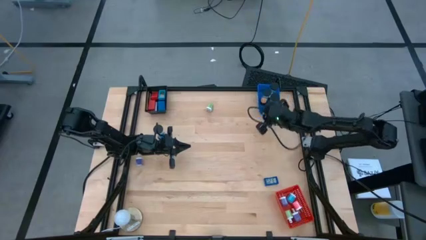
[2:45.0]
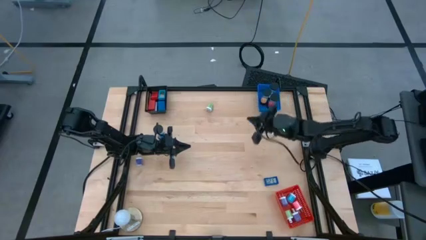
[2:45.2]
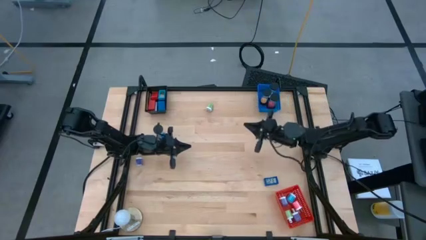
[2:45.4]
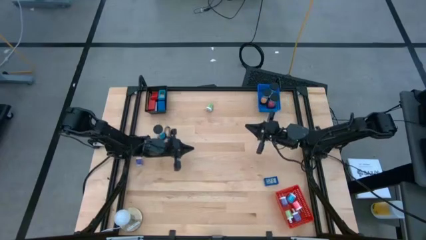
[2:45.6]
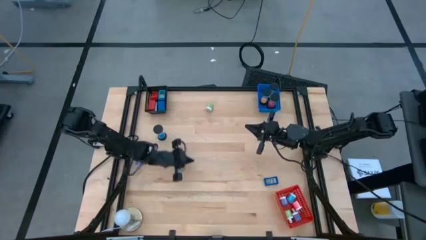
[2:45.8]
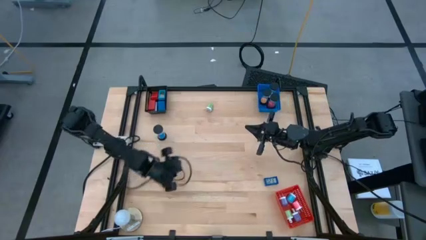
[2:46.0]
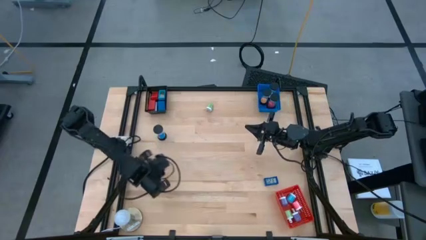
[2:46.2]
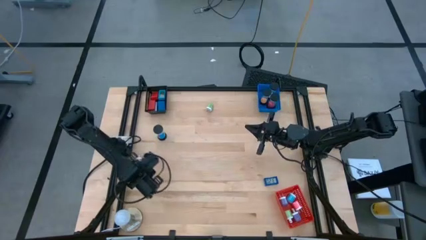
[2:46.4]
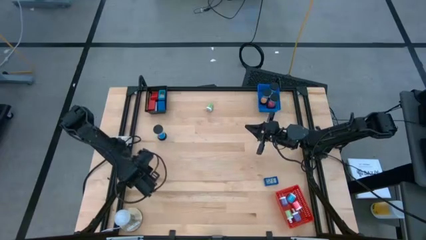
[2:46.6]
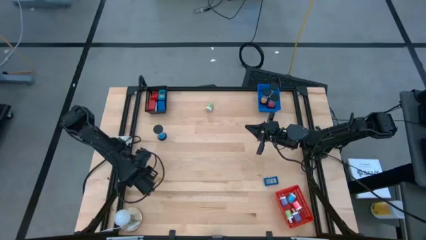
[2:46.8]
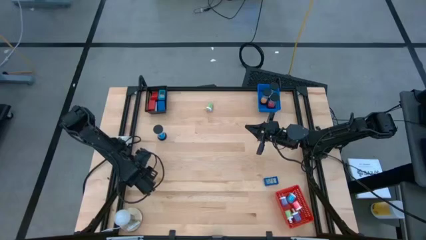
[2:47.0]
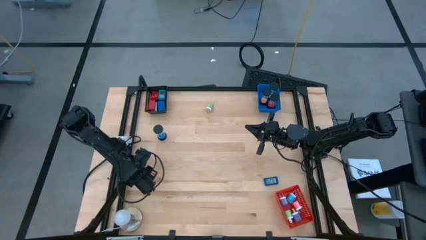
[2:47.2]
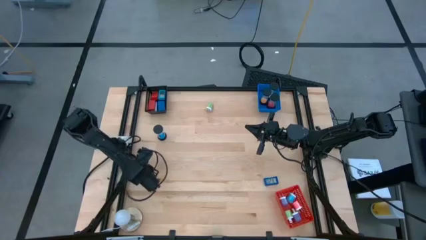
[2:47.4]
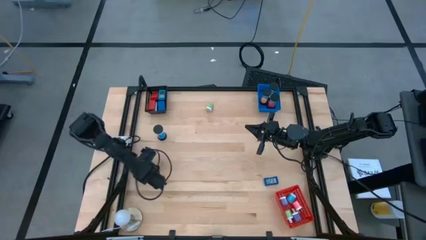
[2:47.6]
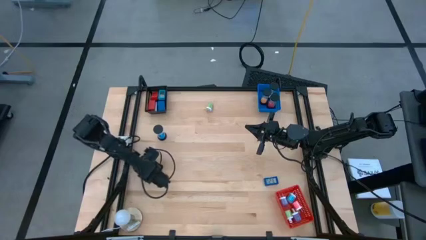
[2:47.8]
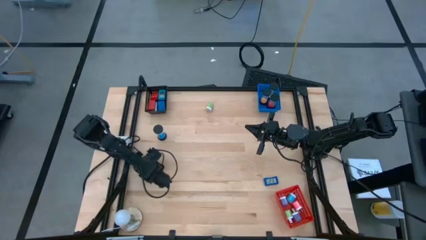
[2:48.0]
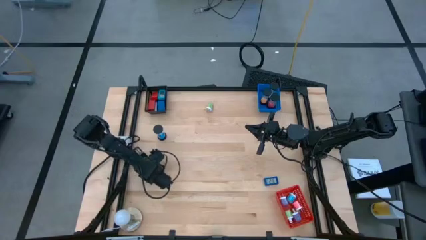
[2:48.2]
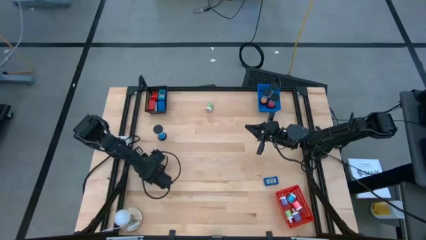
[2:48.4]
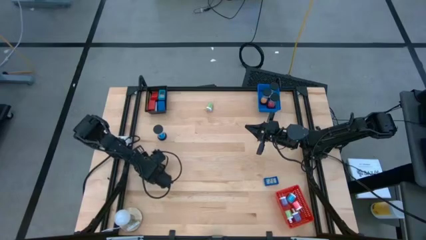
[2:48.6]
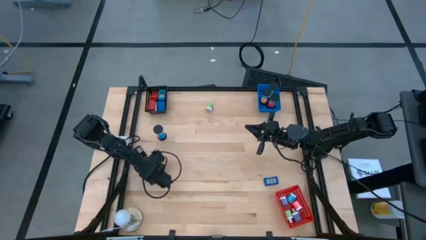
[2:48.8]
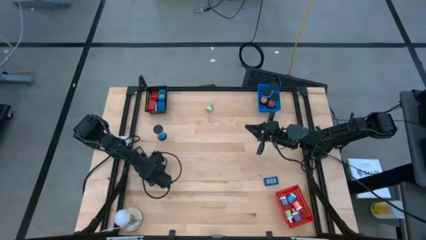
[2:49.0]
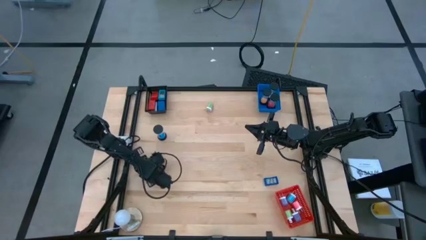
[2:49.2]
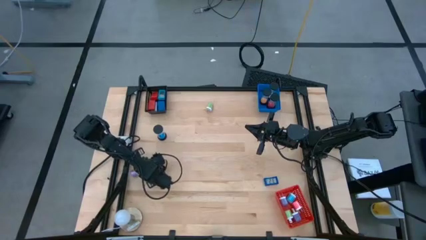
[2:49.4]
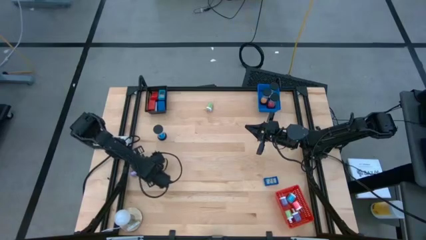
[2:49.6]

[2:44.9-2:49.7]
Task: Pick & Place Office items
Put the blue charger adapter into the red basket

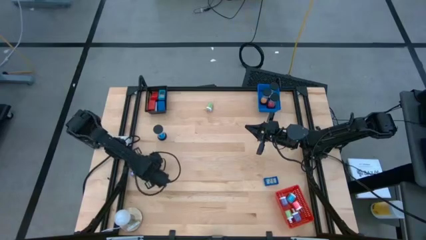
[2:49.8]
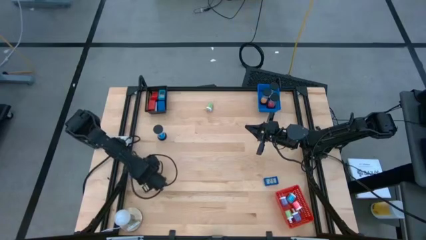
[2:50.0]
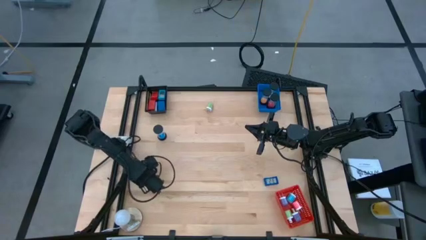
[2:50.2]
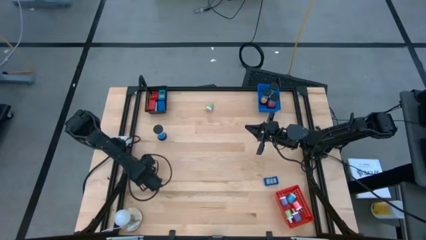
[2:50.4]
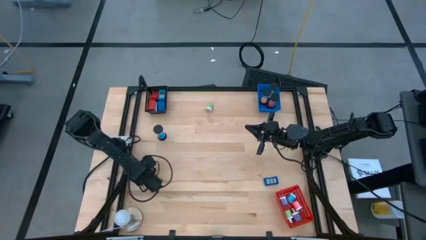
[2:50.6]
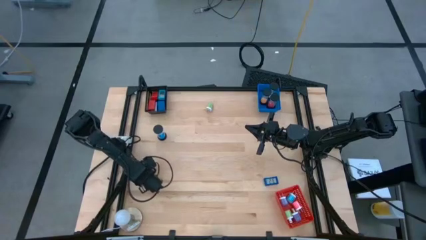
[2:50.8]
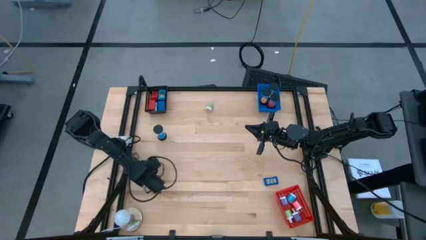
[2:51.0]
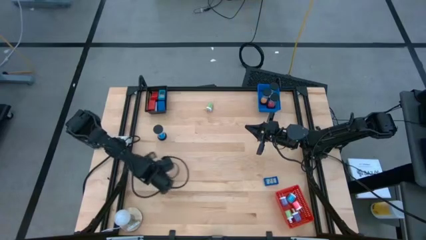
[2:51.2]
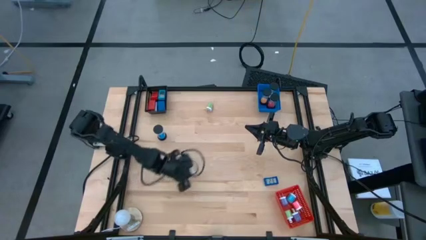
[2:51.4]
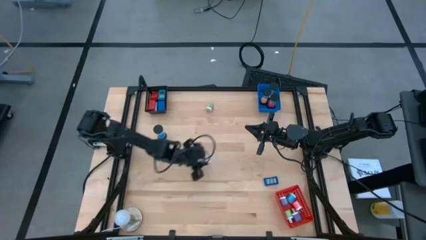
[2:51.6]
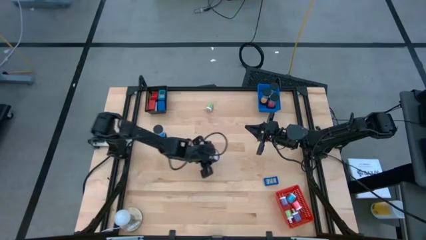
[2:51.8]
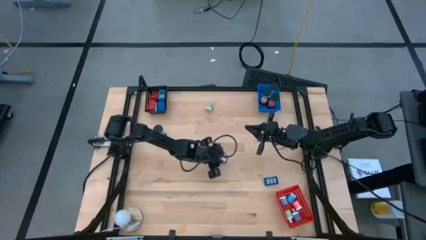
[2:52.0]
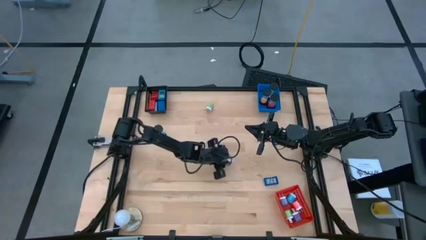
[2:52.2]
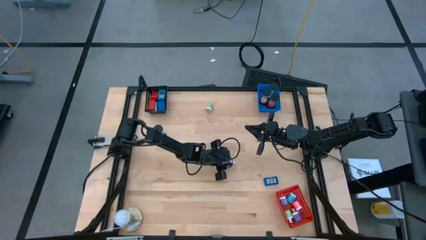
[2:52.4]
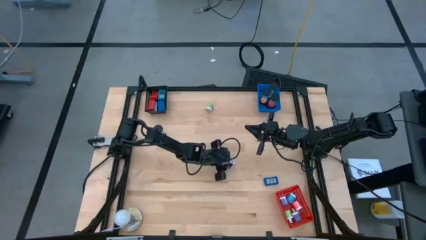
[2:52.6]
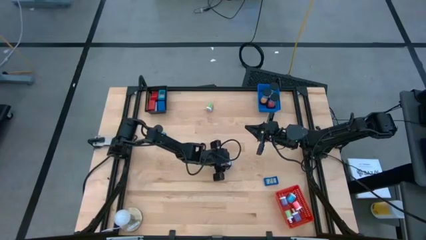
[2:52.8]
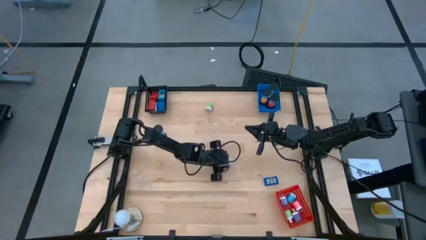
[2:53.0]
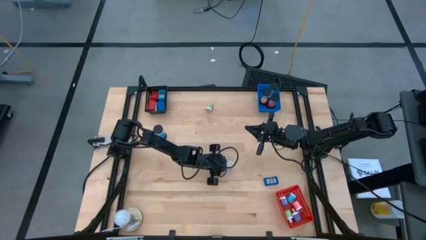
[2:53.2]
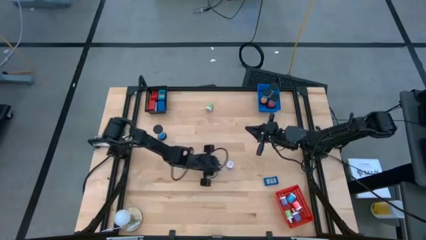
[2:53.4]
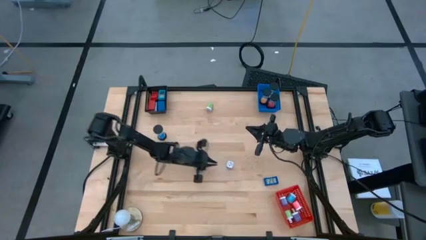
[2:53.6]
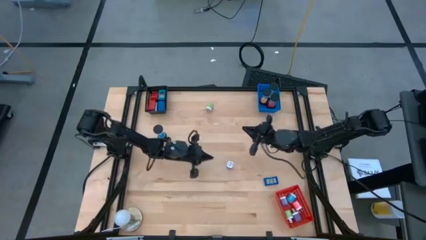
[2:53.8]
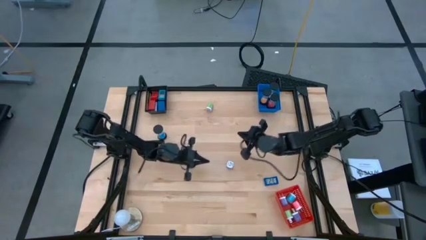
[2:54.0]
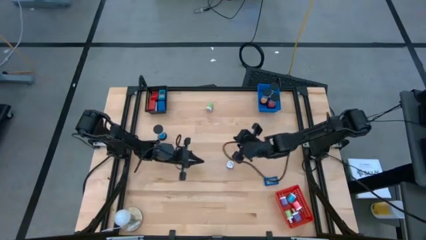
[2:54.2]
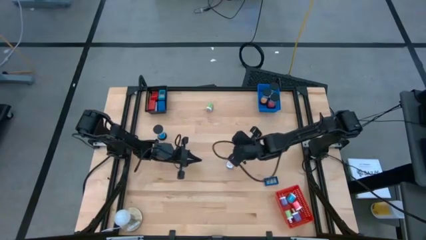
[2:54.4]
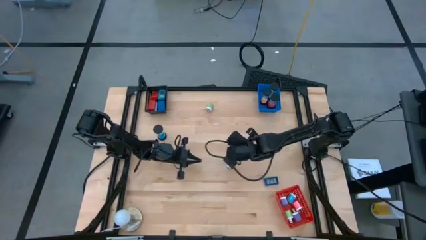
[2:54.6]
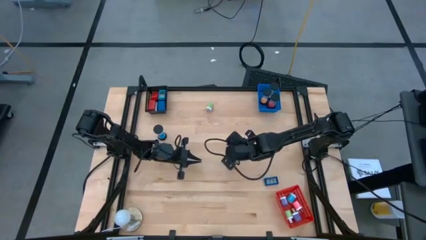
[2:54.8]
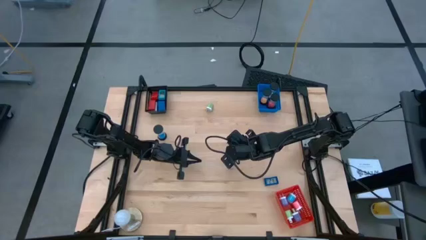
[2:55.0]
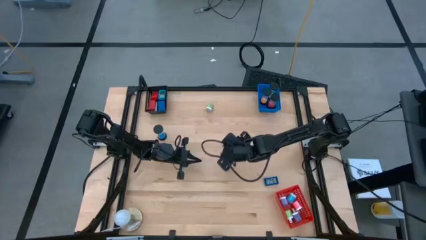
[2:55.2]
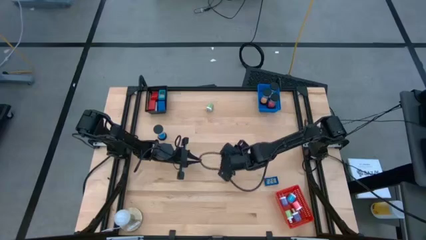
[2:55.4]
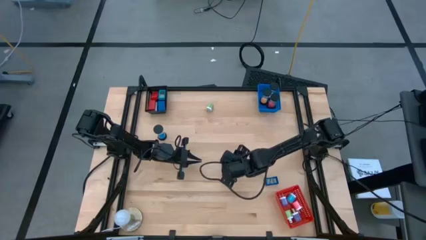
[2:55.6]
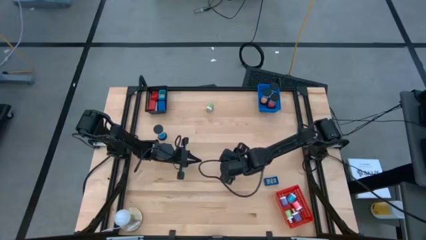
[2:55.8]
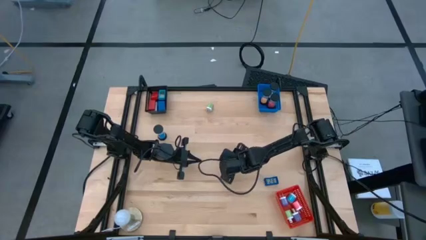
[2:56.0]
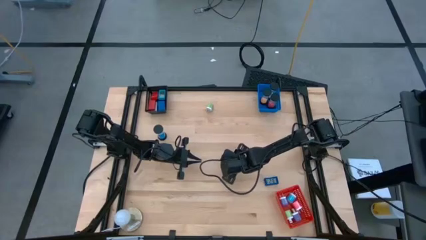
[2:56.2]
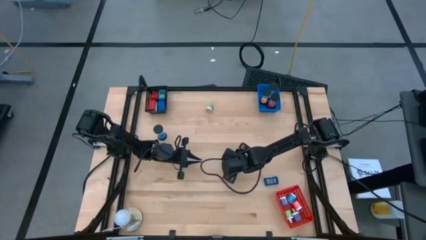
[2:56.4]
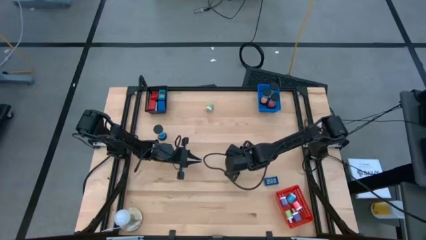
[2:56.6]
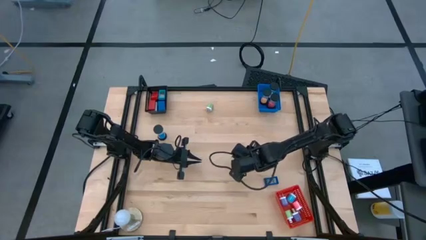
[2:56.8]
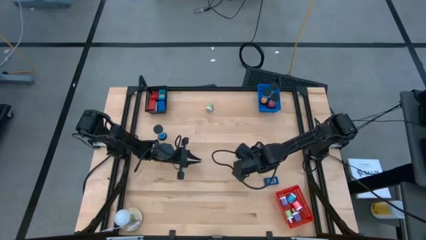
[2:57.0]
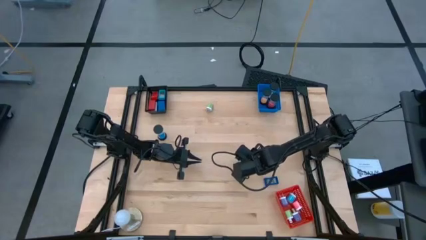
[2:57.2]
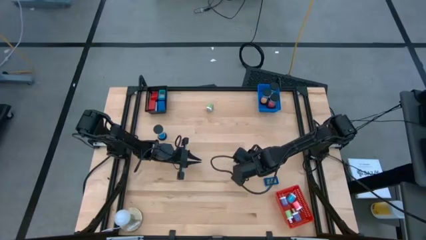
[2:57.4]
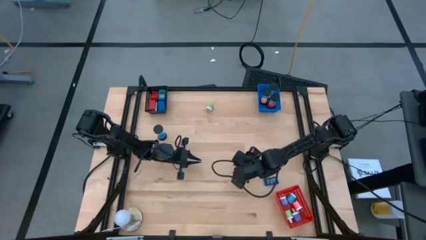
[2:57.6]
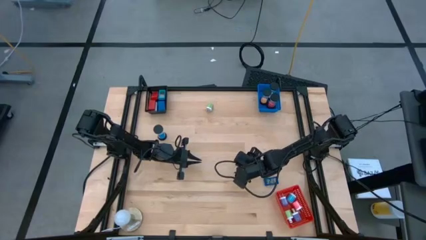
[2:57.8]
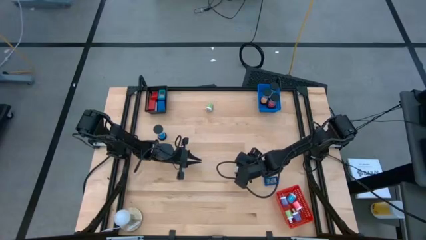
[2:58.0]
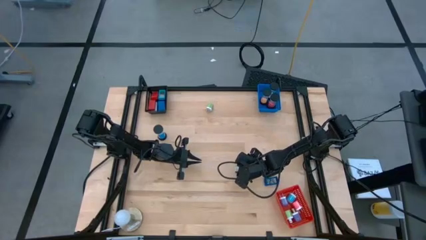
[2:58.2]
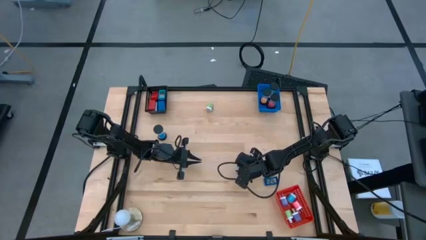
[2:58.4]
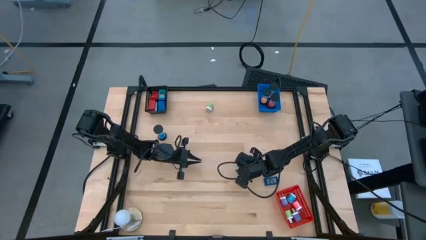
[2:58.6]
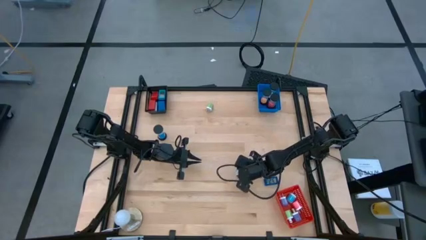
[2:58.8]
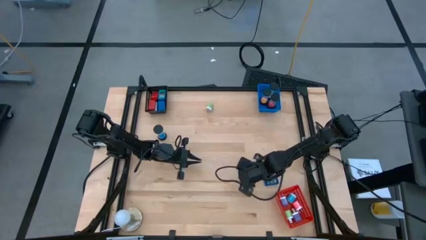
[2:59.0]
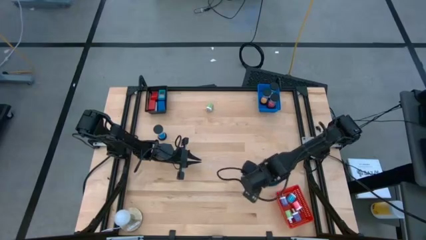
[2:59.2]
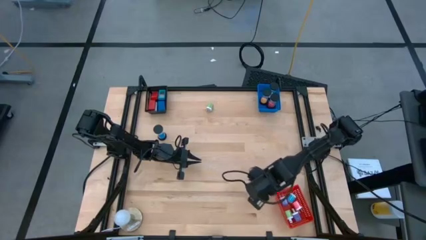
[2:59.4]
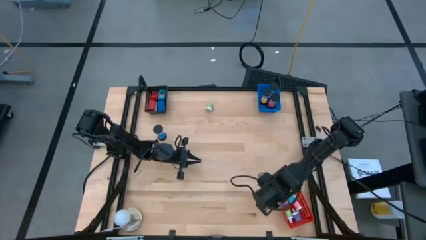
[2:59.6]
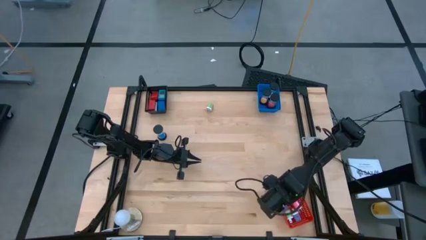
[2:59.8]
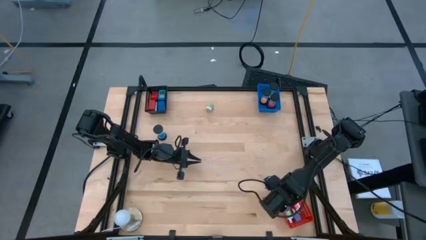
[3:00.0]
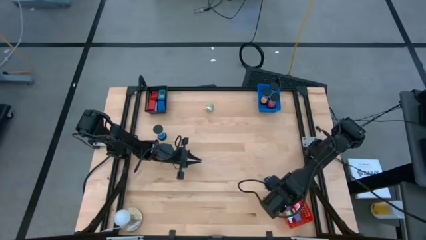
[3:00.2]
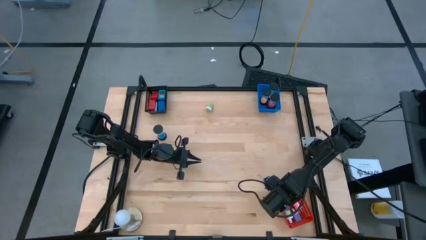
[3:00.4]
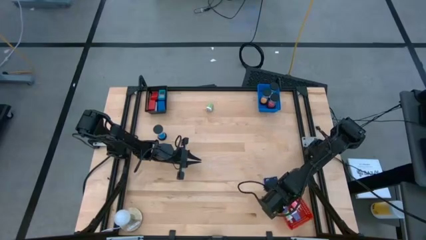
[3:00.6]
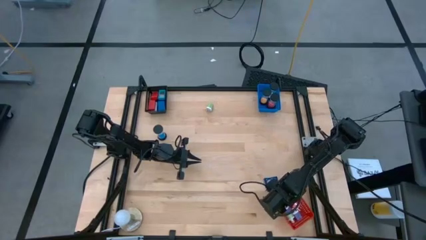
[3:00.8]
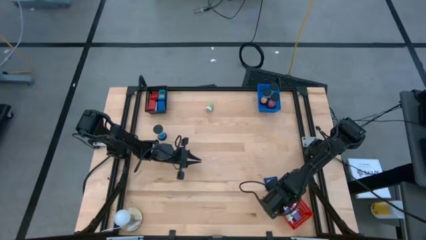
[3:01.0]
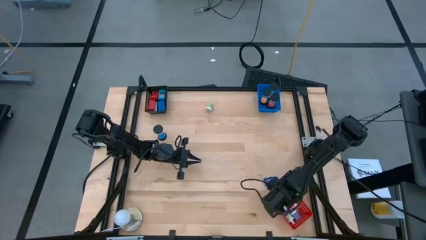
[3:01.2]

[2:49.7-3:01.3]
Put the blue charger adapter into the red basket
